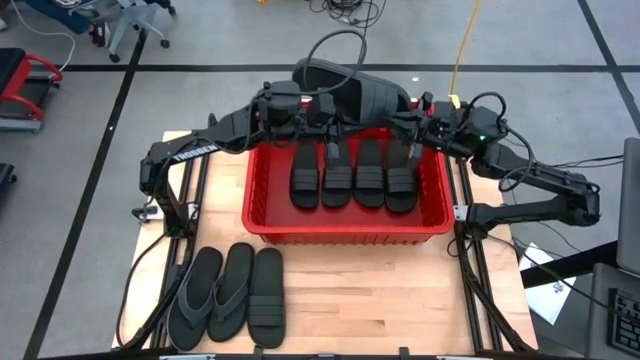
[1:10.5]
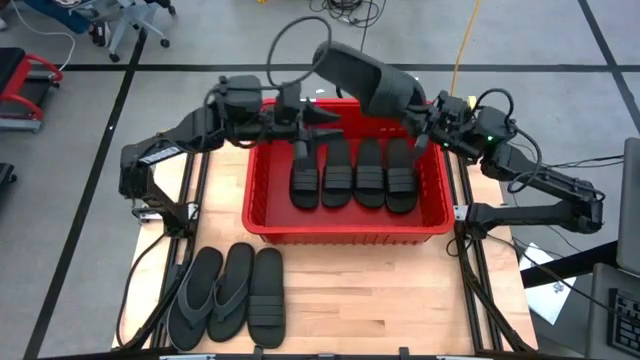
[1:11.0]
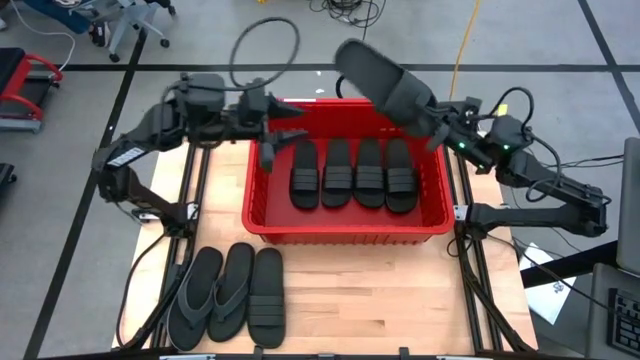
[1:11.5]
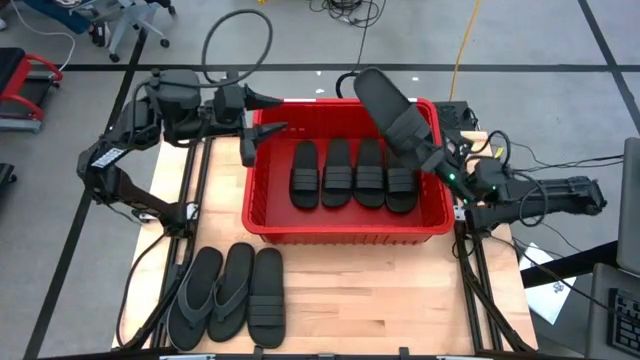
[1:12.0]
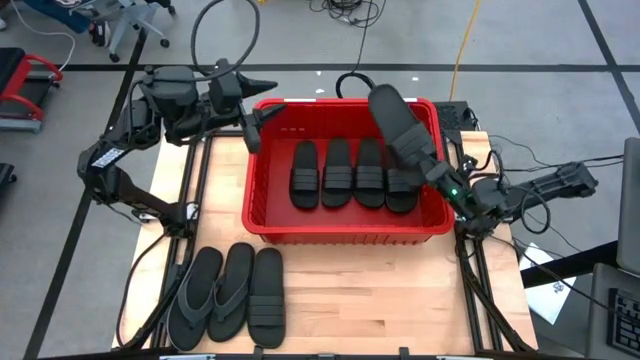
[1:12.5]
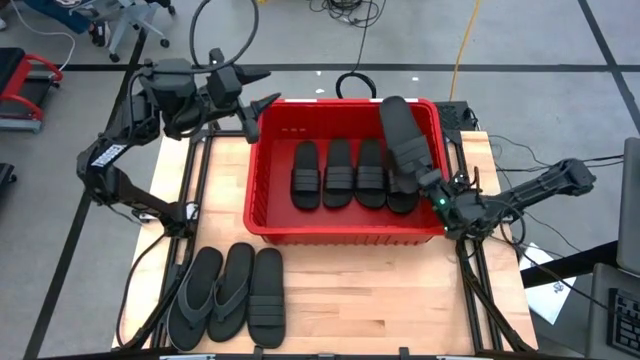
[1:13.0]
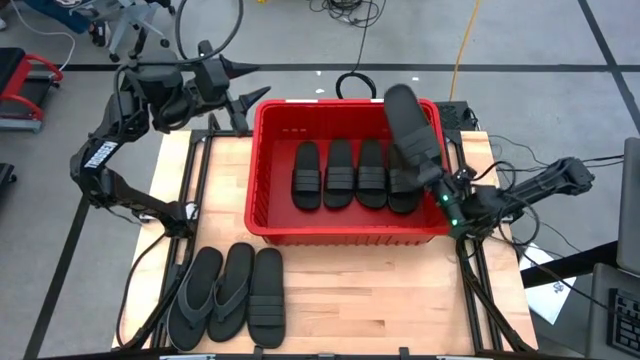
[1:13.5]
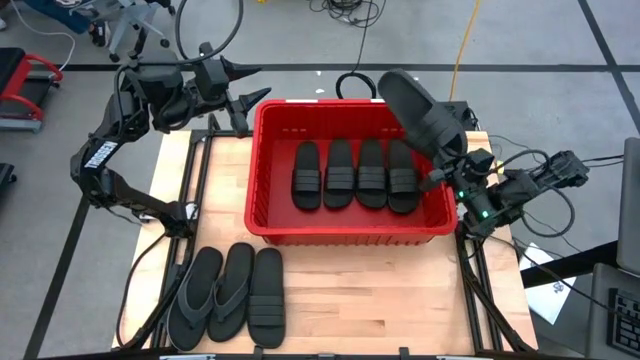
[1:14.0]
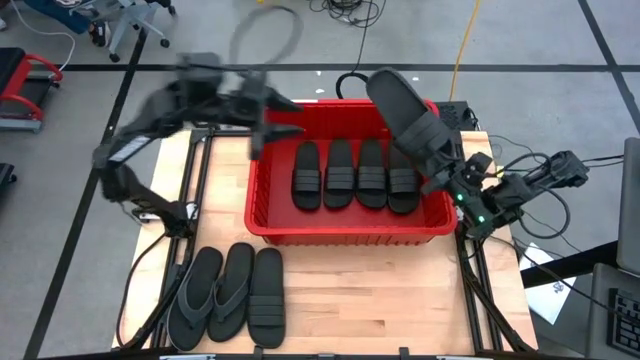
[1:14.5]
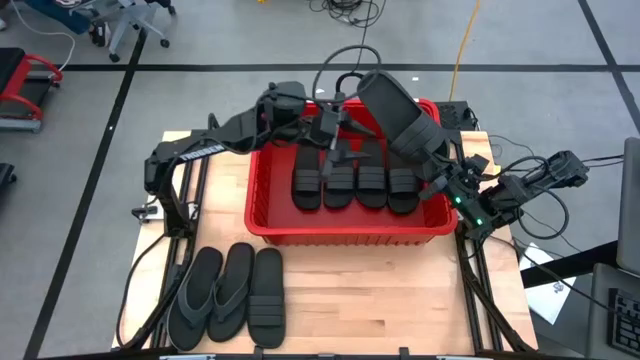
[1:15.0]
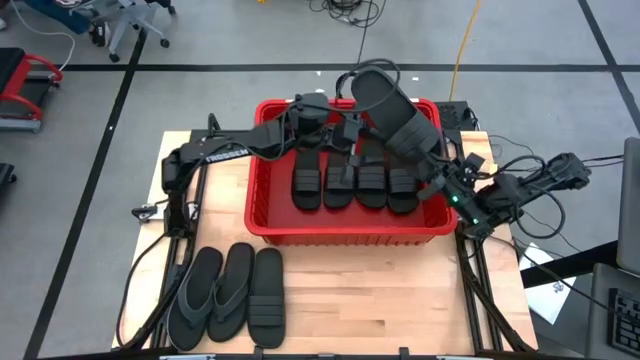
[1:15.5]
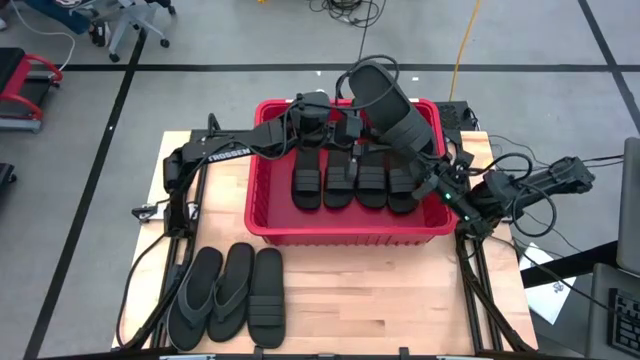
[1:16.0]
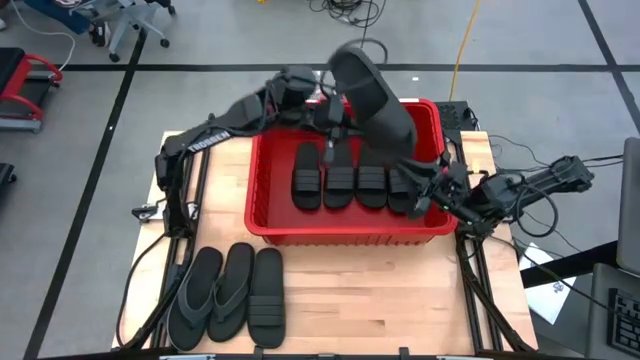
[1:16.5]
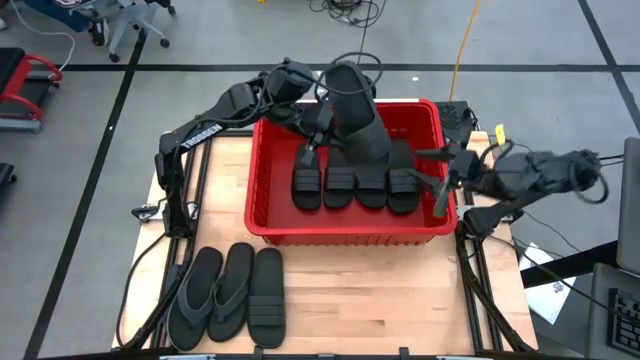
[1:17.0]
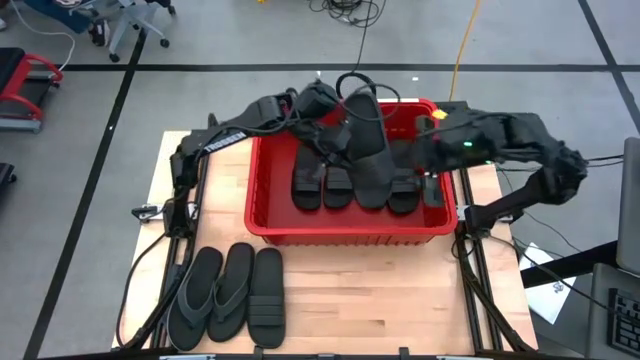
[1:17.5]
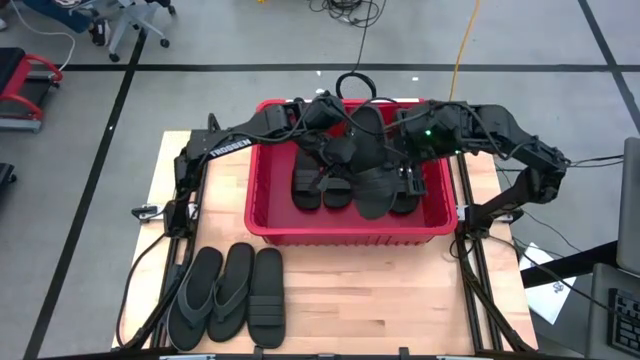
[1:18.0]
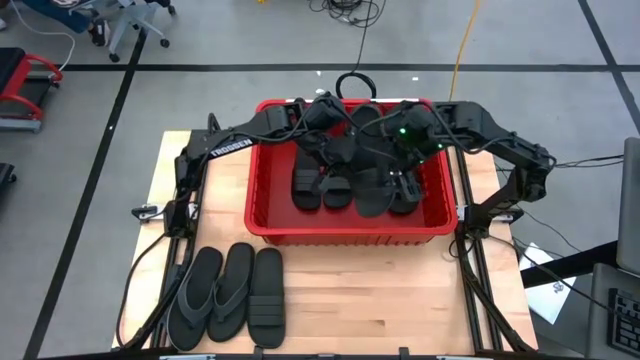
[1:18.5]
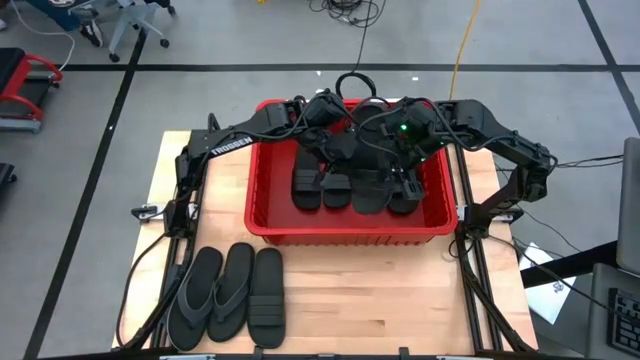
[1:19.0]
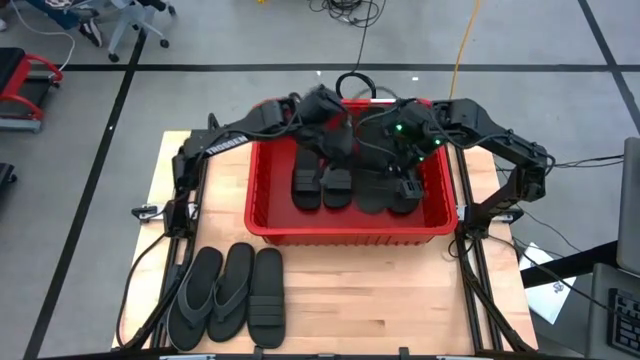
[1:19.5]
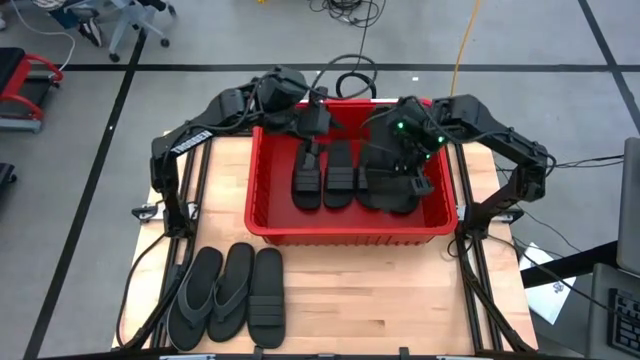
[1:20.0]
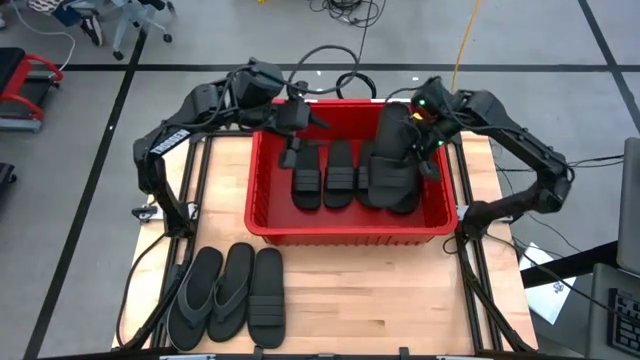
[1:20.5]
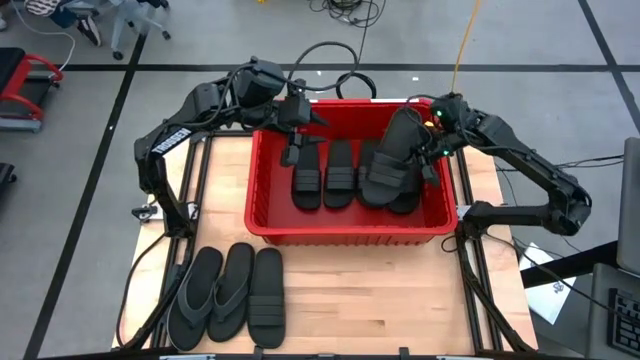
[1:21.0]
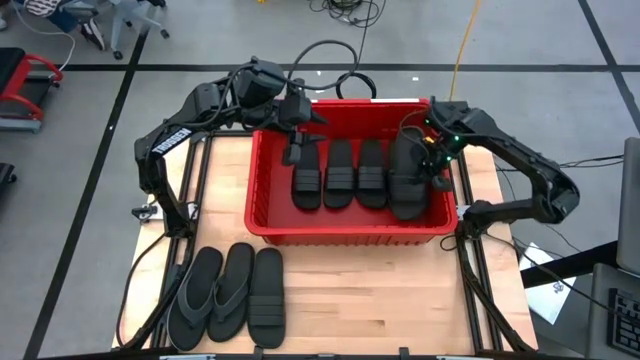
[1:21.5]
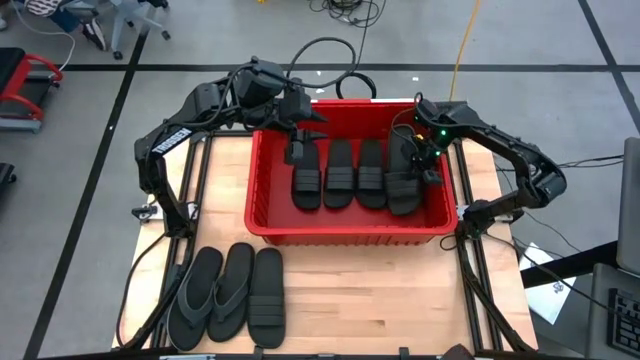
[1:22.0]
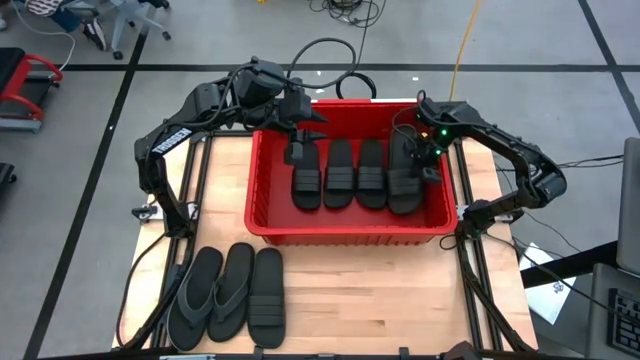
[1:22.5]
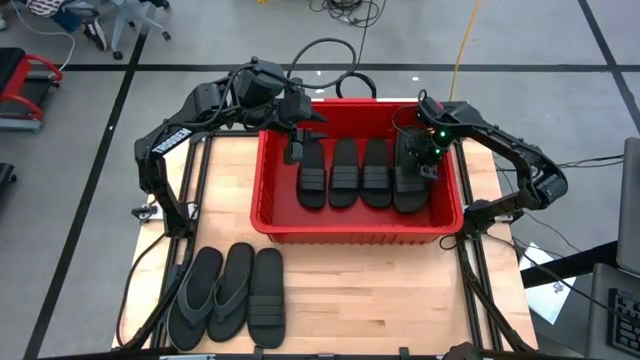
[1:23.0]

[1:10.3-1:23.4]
Task: Pick and place slides into bin
Put the black slide into the red container

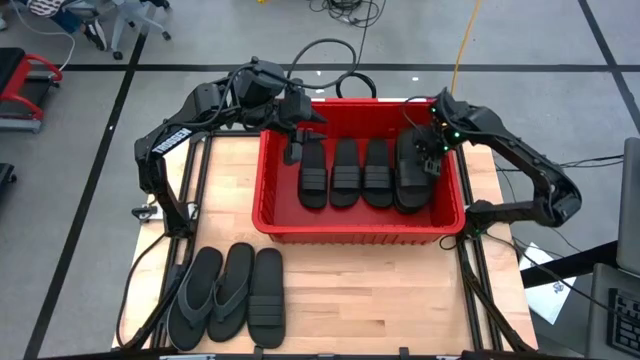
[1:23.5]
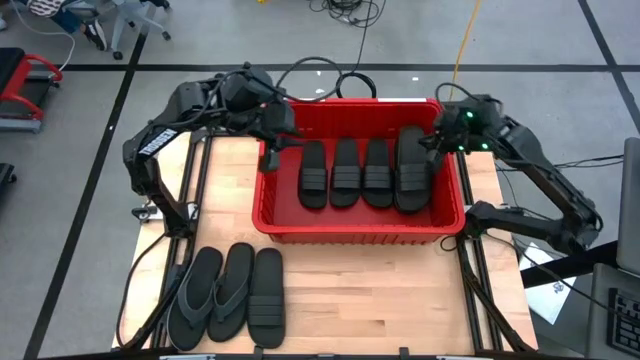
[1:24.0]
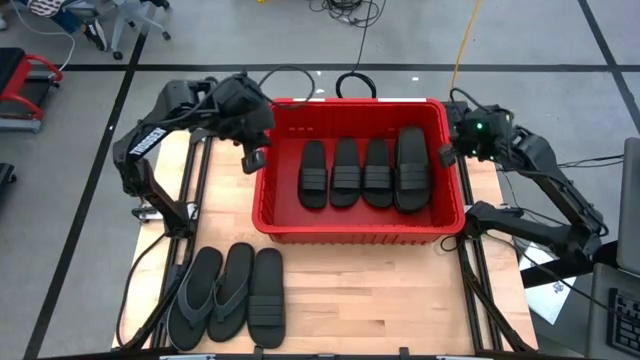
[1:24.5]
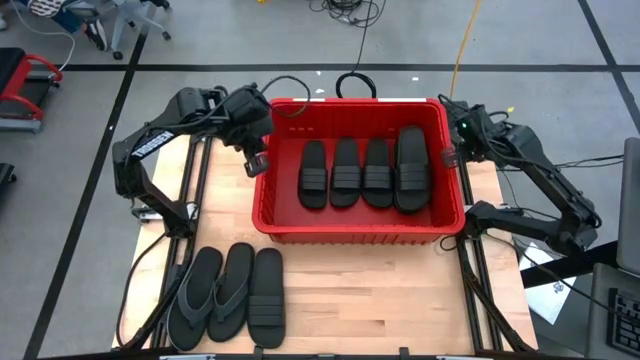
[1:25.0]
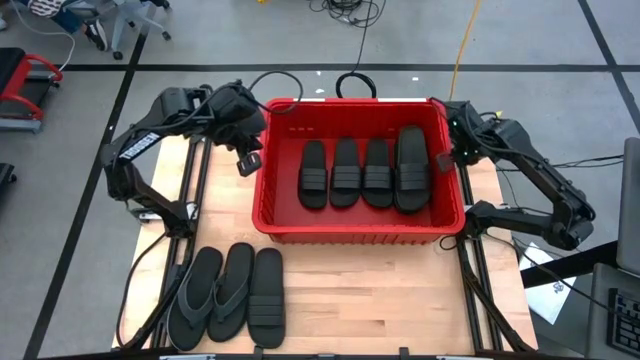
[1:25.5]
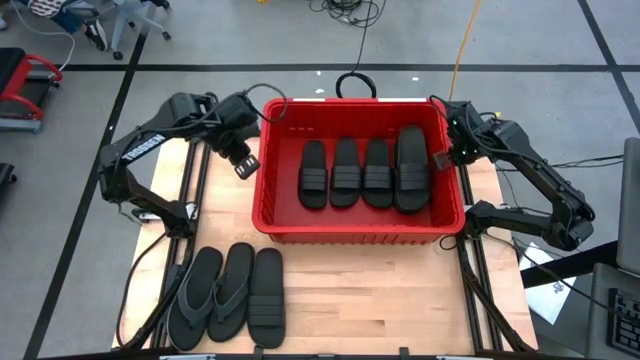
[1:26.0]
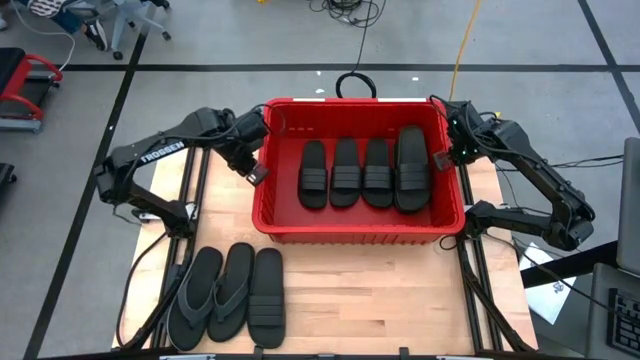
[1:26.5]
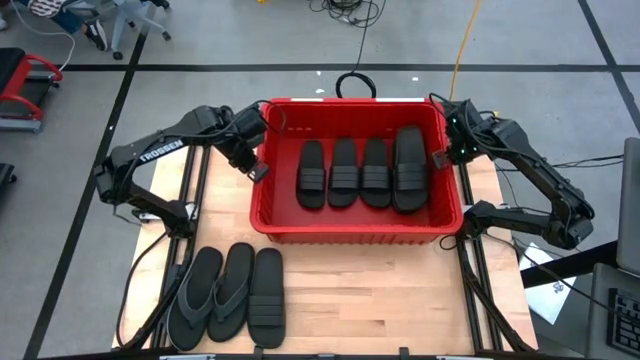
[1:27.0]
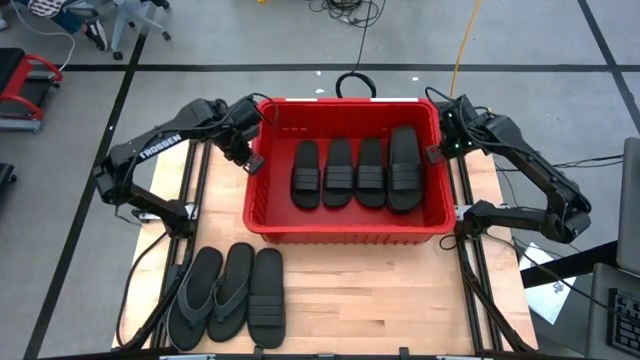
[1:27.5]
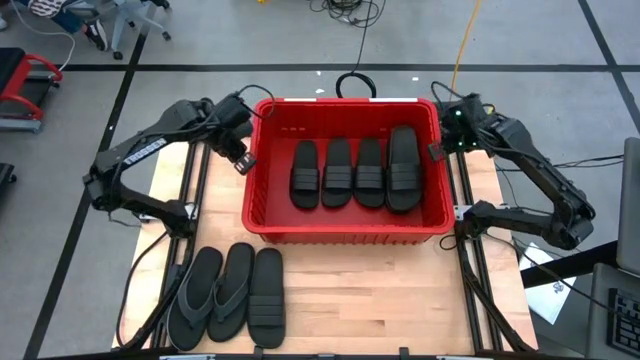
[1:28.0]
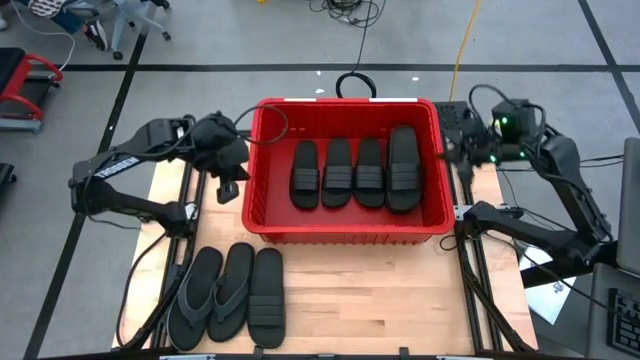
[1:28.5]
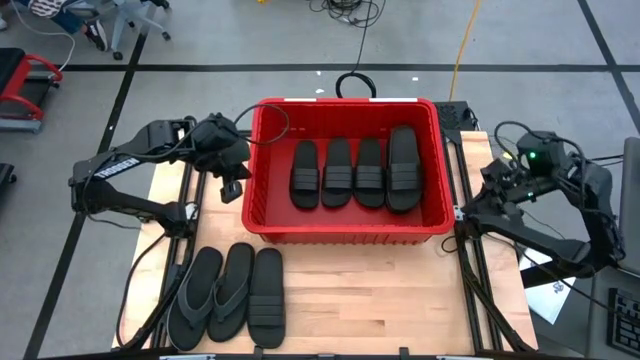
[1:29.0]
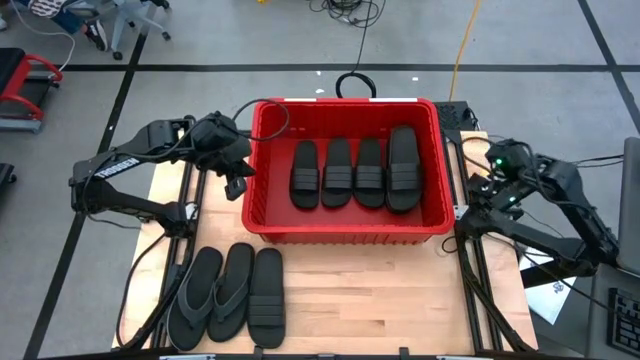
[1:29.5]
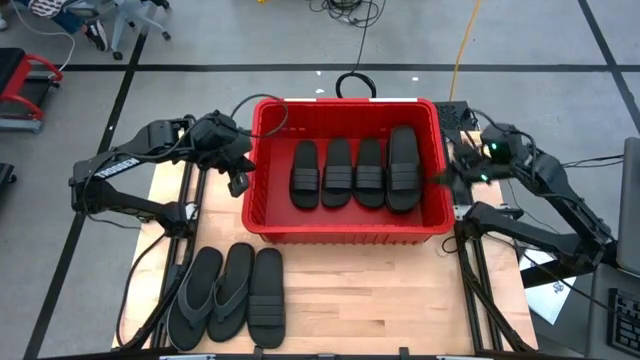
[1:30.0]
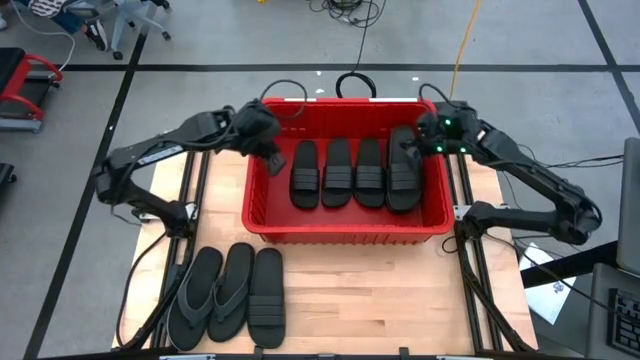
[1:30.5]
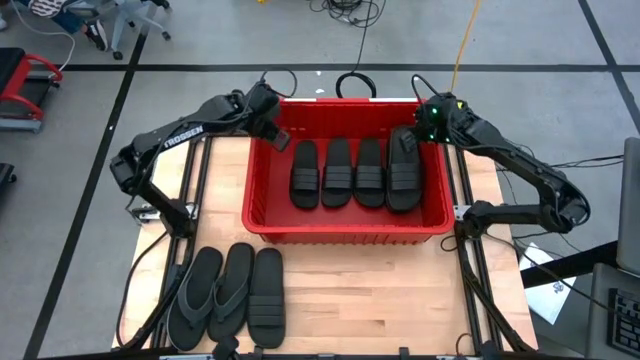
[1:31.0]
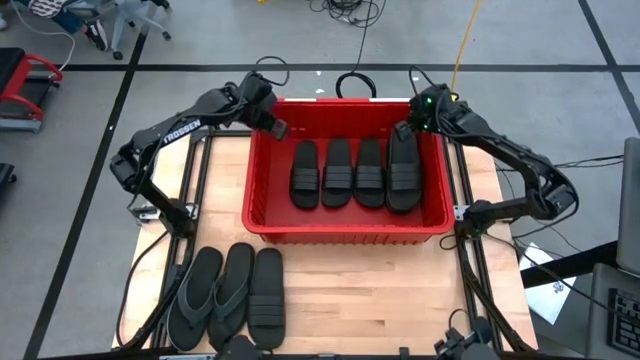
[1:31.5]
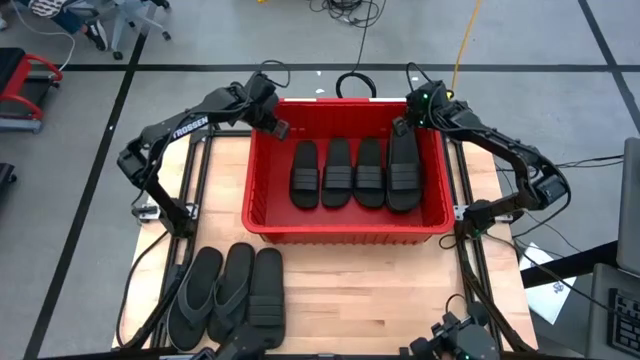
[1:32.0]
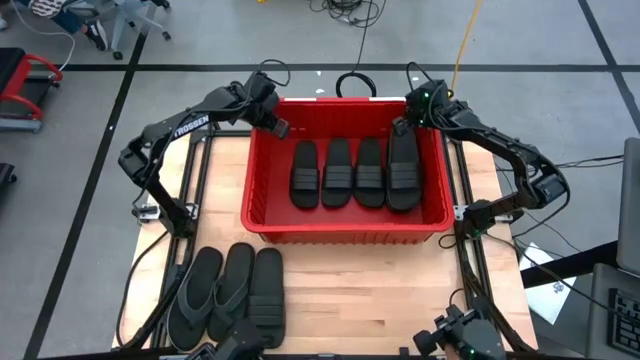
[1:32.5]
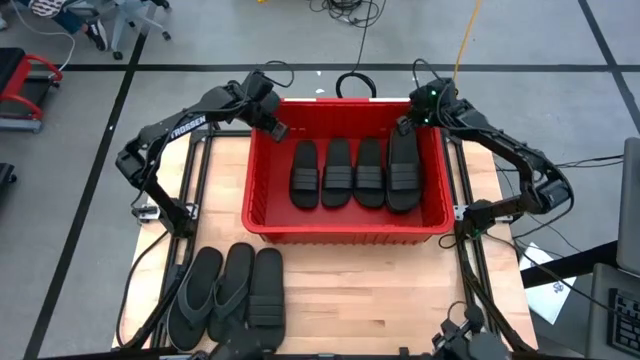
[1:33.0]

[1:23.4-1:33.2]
Adjust the red container
